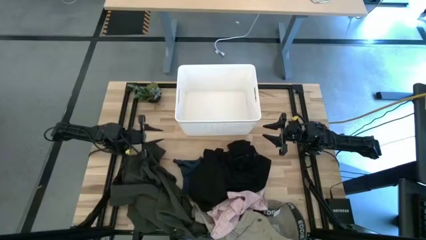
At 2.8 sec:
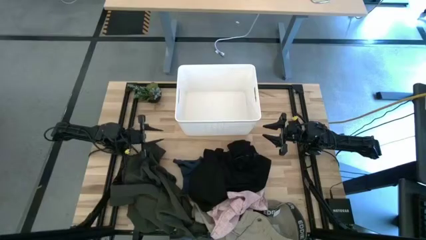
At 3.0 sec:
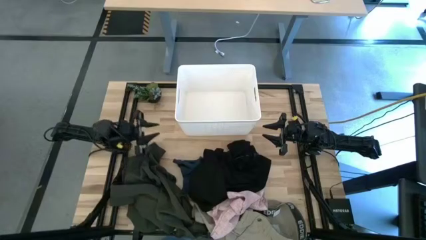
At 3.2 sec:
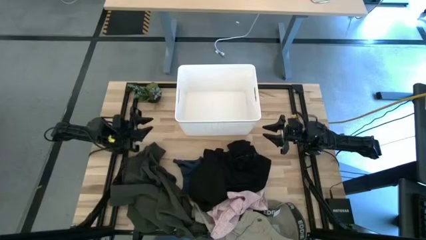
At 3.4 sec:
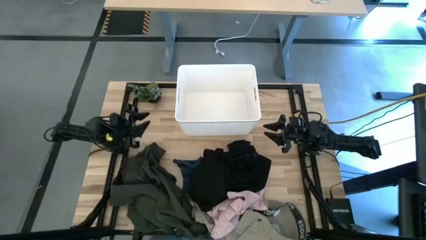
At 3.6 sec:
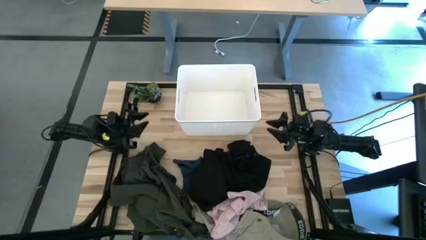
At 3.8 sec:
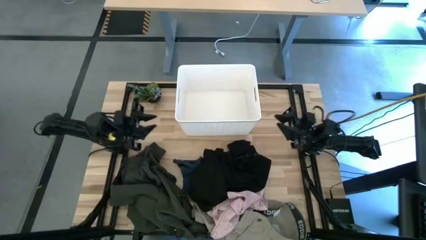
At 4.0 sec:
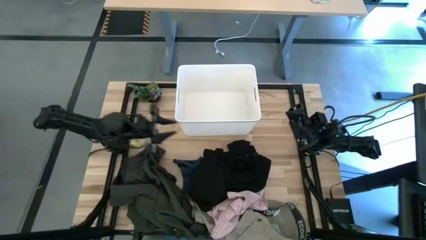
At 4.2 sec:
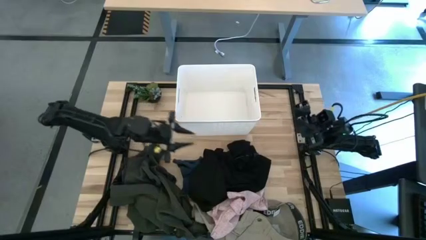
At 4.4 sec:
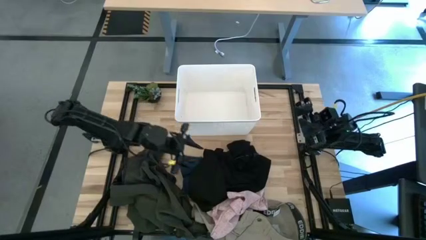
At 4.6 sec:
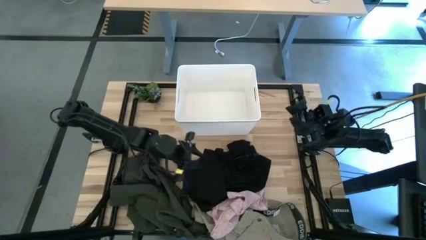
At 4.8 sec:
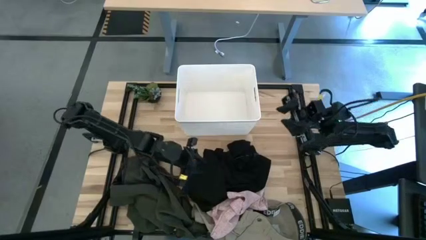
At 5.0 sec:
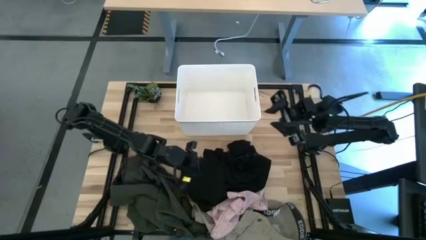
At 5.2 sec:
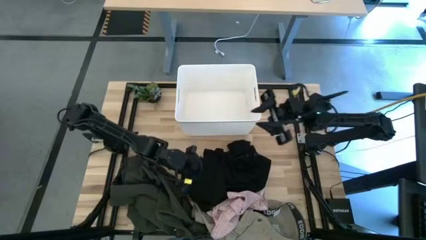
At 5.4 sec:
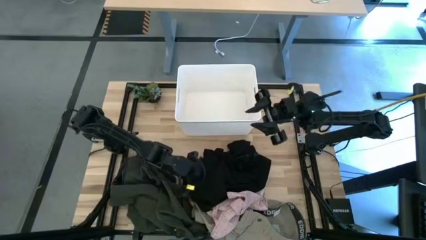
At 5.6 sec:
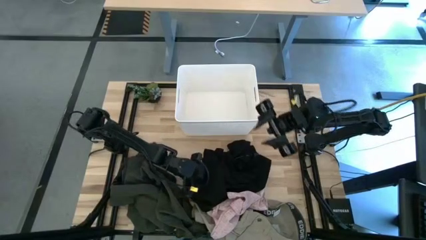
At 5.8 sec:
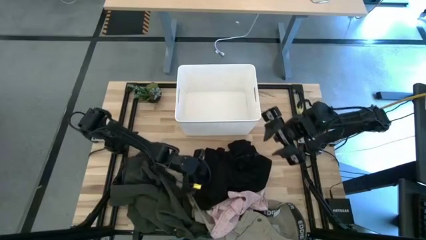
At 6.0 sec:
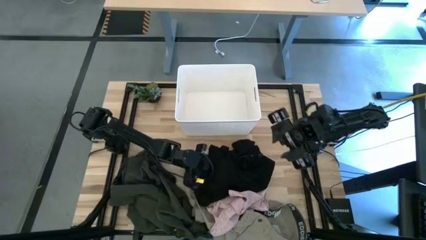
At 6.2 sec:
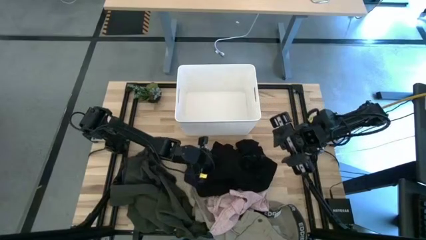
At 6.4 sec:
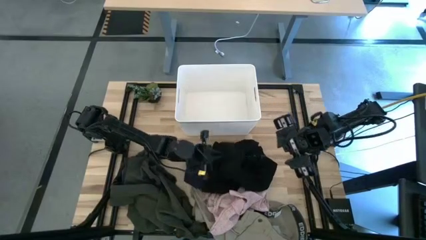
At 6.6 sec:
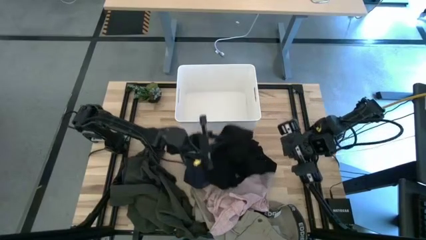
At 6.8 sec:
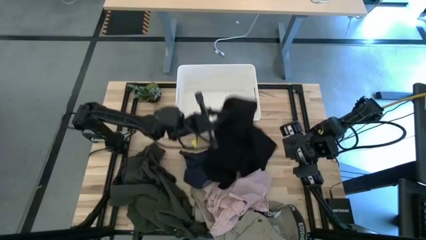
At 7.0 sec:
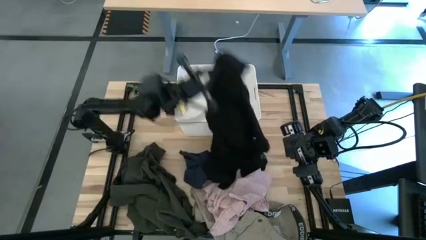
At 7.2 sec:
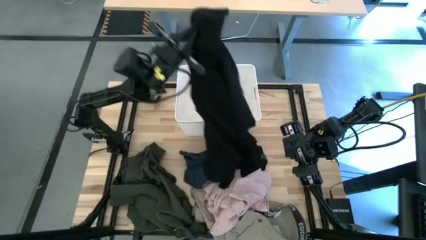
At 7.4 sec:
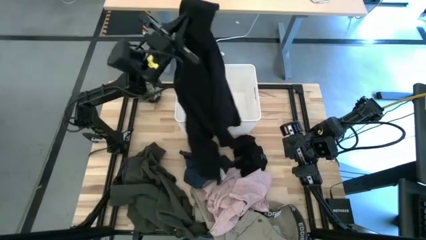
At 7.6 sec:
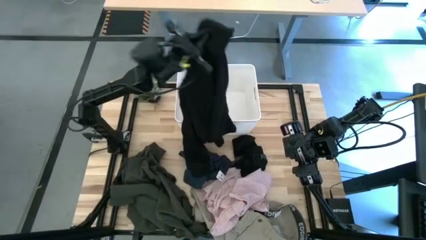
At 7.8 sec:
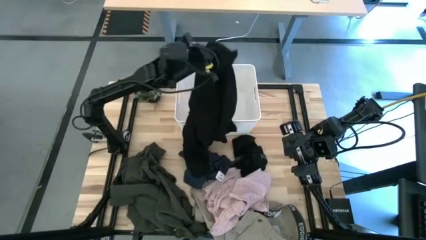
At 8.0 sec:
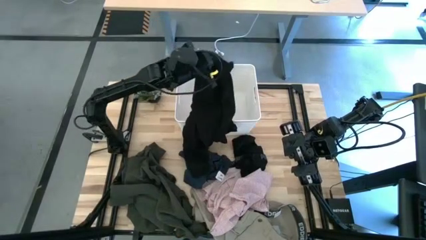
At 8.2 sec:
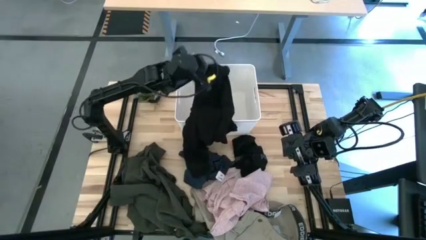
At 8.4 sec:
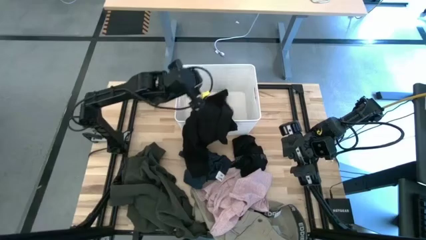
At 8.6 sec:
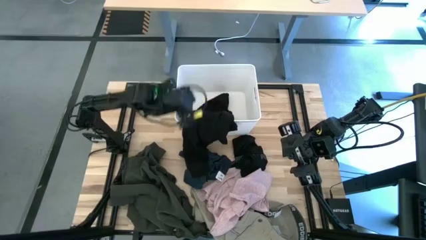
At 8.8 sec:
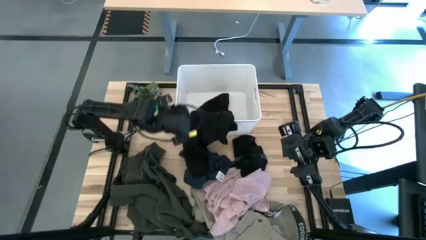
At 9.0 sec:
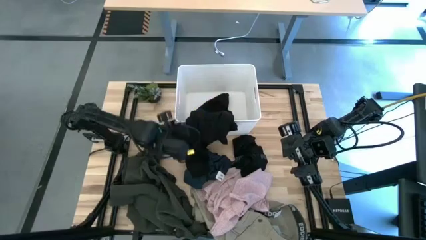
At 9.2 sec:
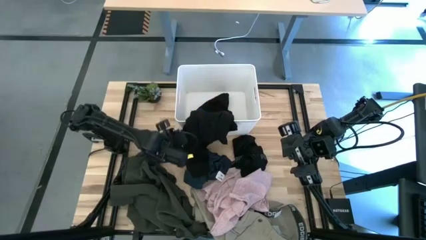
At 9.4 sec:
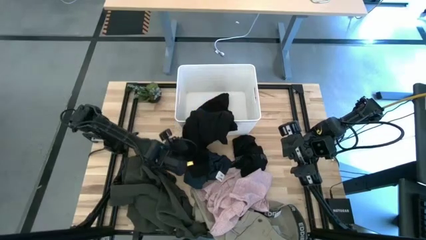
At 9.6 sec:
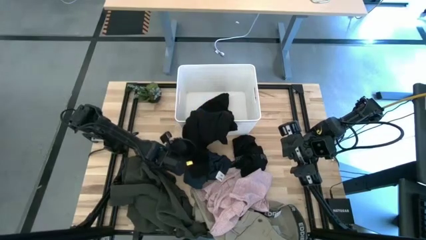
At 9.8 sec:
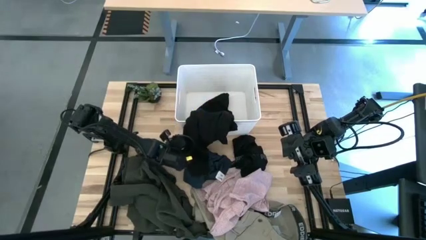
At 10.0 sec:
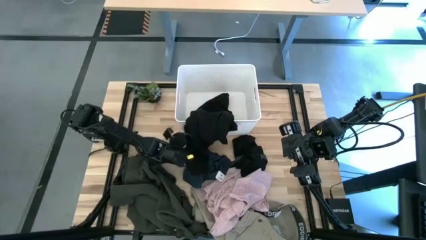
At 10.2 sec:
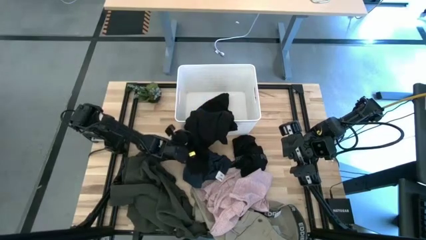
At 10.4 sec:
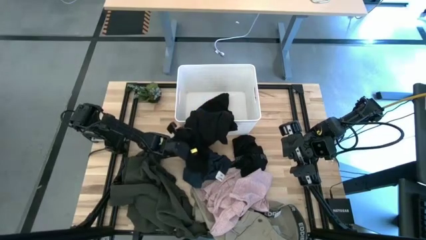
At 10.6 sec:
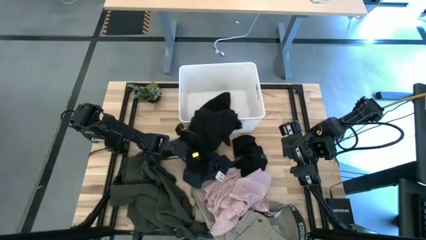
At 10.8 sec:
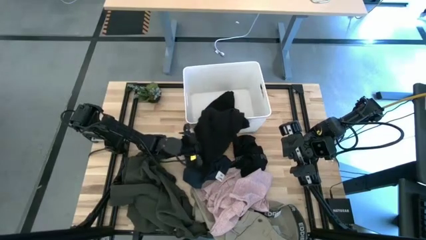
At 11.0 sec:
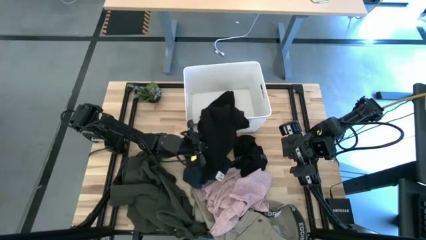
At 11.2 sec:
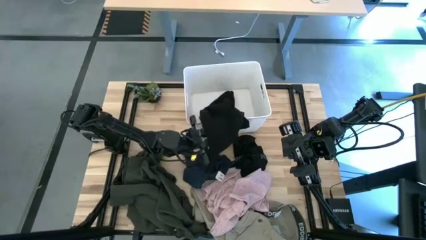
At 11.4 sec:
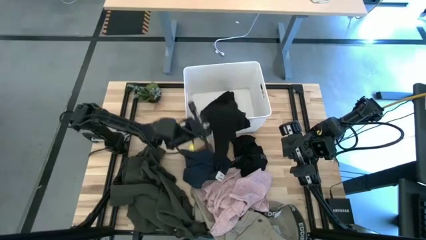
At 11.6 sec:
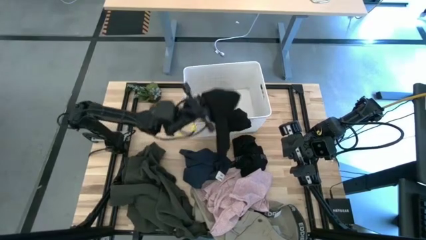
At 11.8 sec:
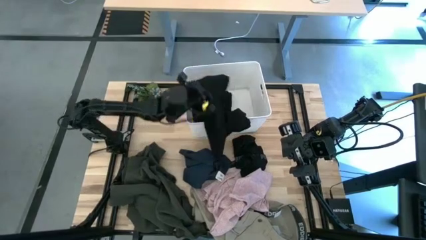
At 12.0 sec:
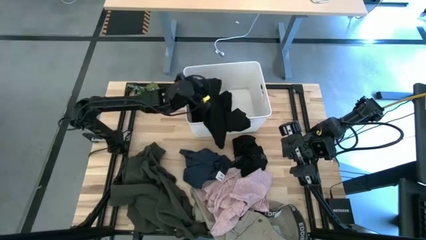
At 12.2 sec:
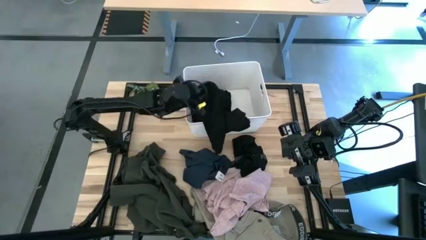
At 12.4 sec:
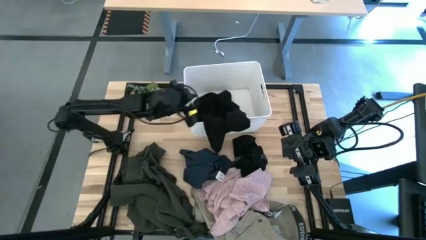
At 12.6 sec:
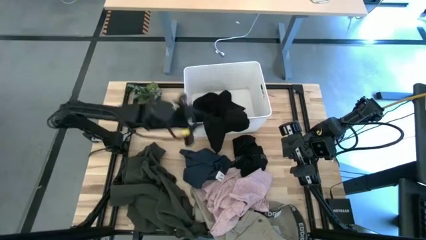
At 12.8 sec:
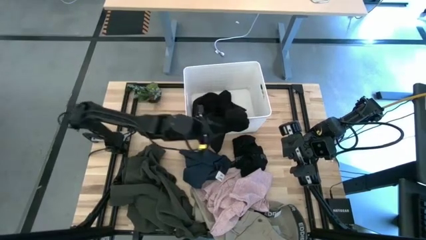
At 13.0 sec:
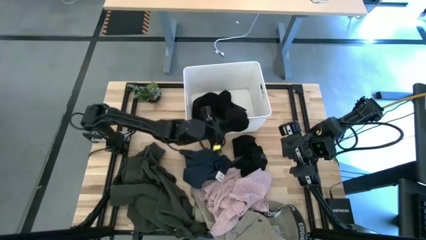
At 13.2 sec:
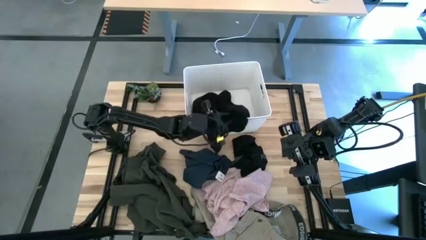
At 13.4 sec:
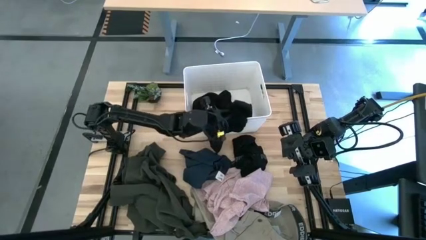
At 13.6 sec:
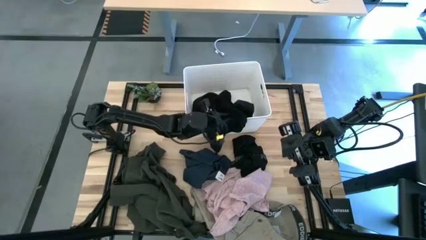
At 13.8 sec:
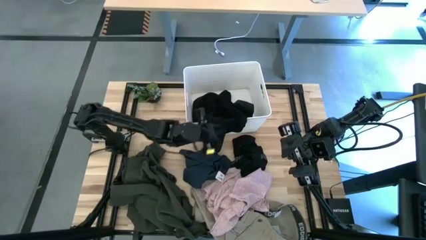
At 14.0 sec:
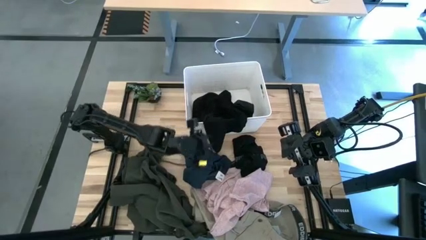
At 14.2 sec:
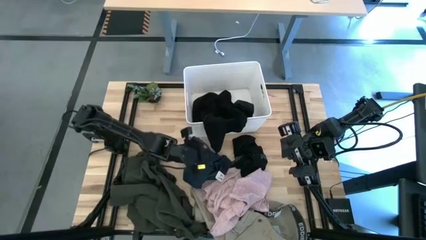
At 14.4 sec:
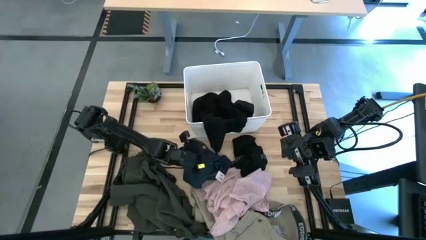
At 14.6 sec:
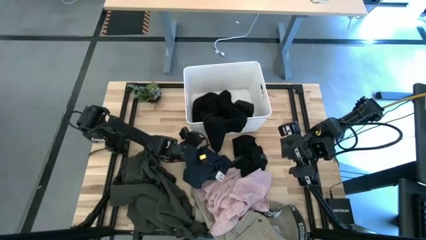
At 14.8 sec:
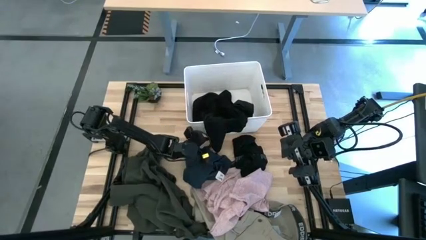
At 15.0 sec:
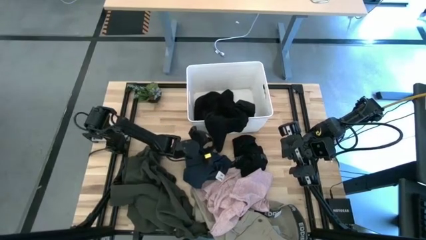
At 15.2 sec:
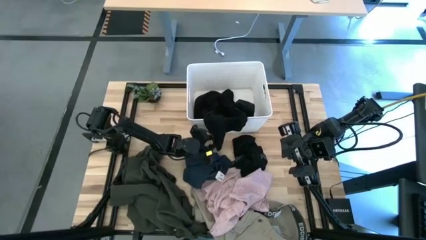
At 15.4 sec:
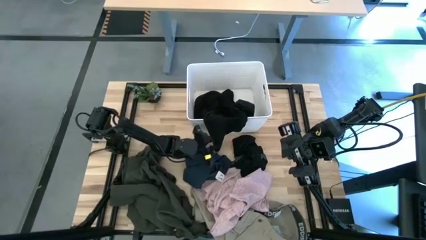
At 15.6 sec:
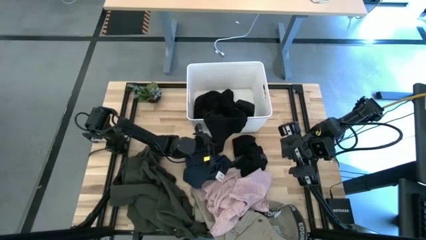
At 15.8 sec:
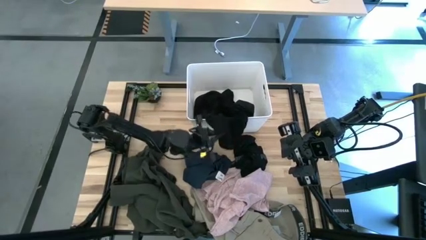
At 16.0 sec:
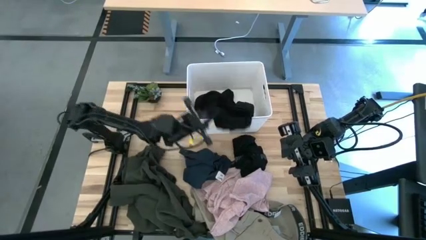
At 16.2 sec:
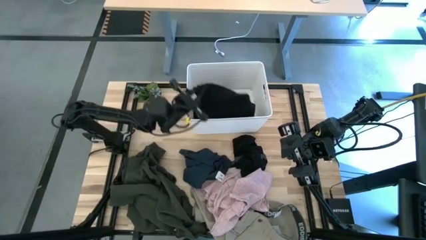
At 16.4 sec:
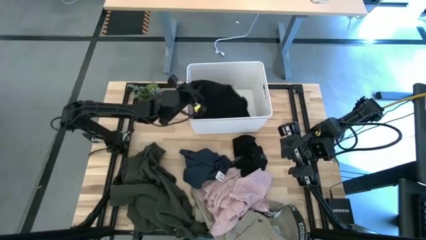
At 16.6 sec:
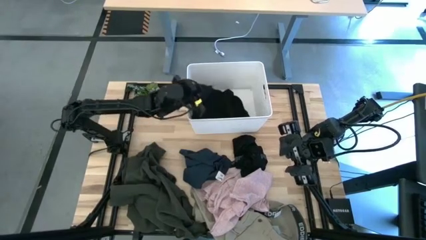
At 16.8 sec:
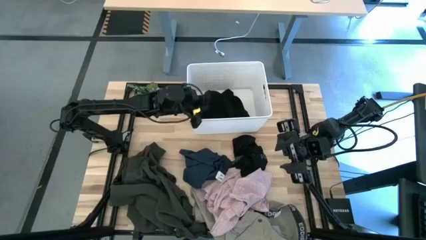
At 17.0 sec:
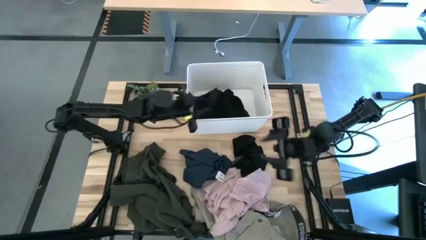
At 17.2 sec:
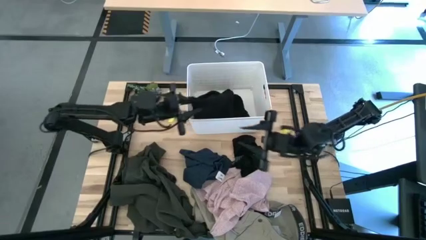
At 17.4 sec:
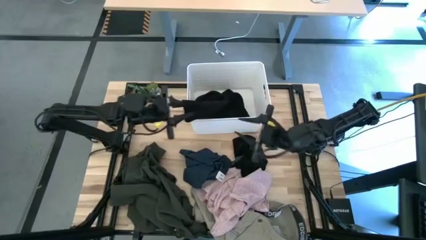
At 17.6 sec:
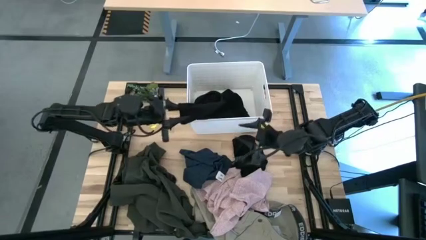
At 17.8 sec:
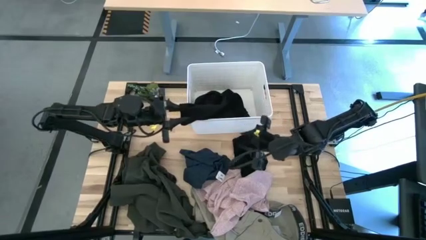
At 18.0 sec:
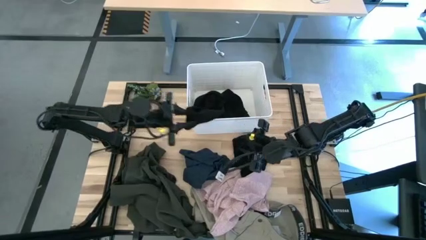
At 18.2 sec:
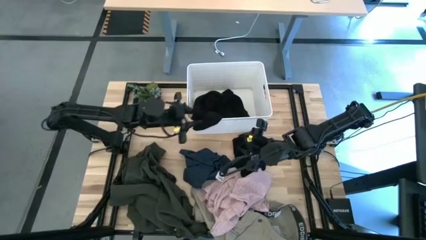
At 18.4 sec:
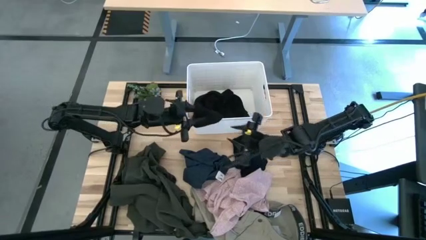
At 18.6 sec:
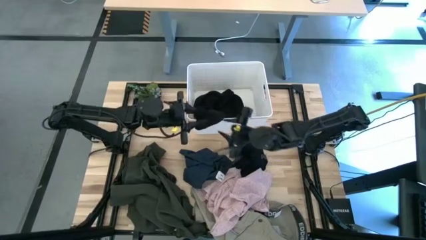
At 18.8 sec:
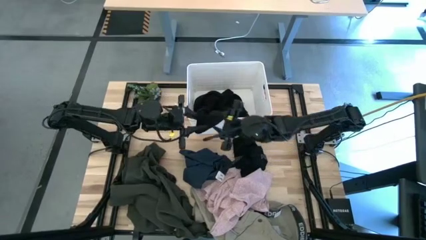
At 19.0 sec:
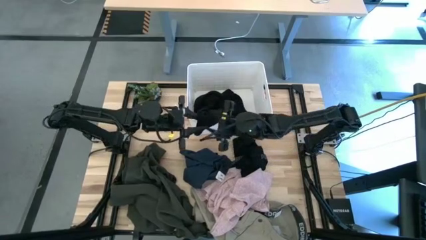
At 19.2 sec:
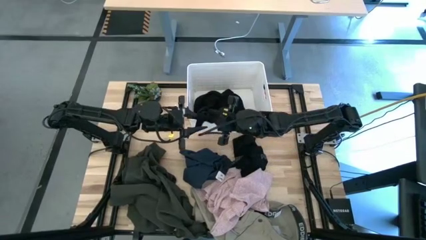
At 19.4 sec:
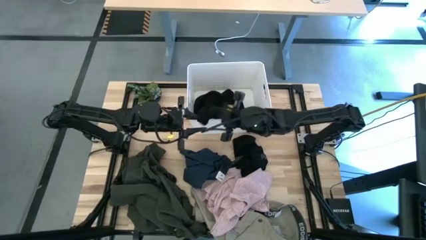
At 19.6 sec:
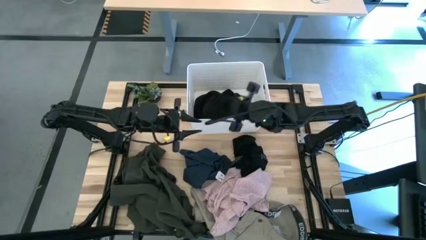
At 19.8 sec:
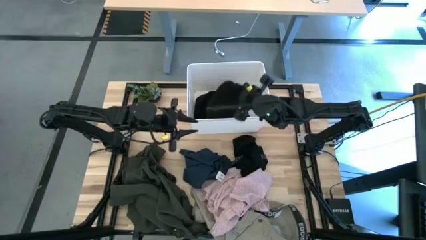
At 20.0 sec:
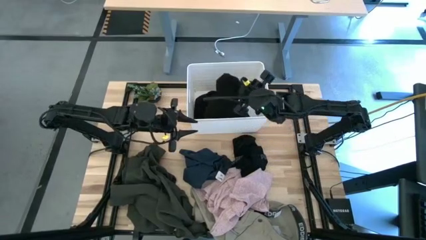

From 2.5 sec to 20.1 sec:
Task: Sort clothes
Put the black shirt into the white laundry bin
